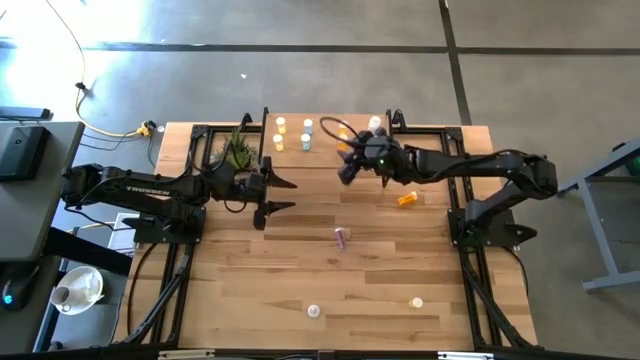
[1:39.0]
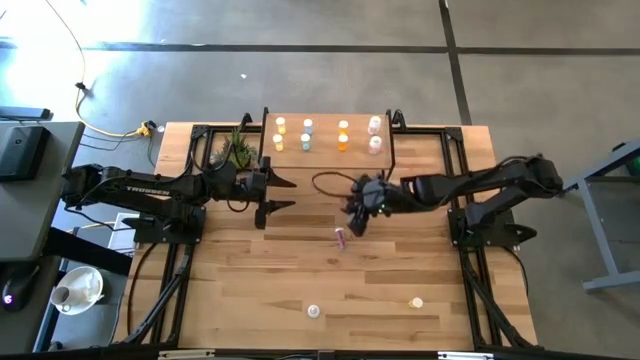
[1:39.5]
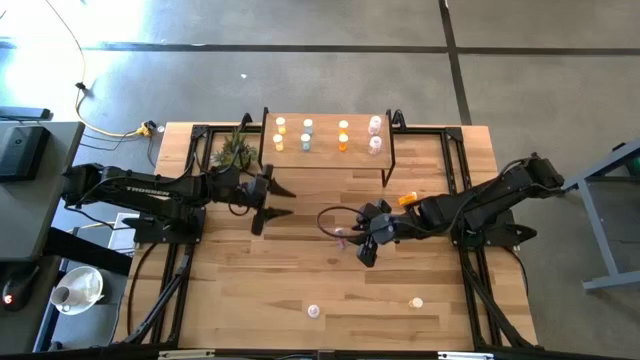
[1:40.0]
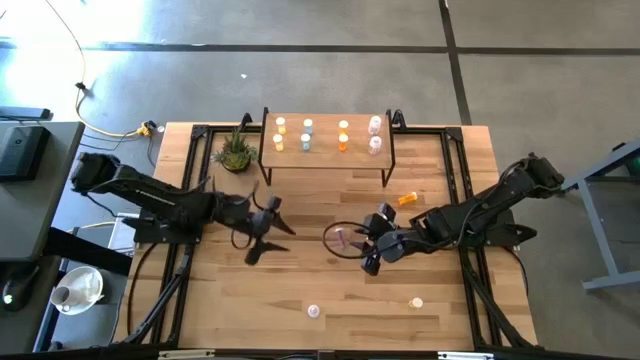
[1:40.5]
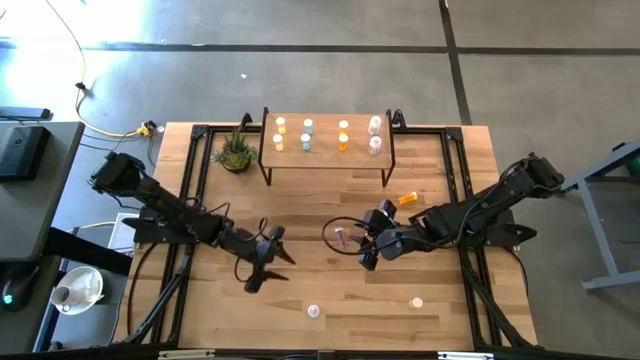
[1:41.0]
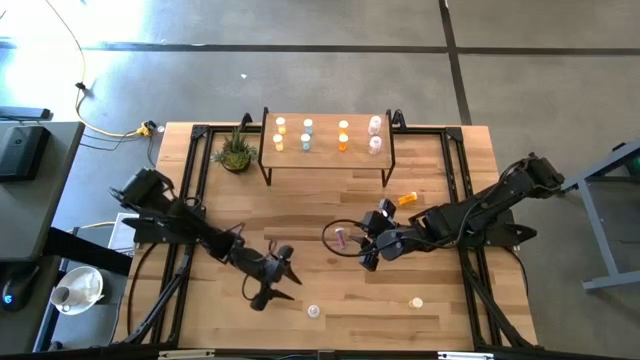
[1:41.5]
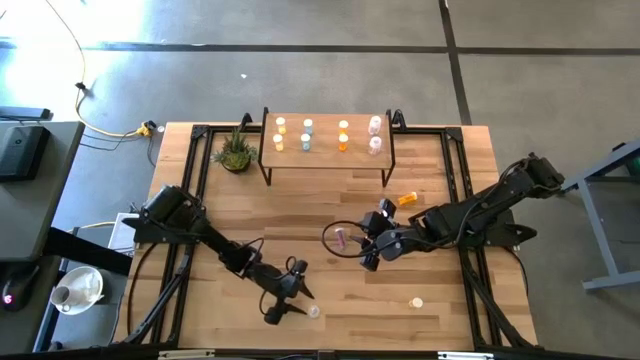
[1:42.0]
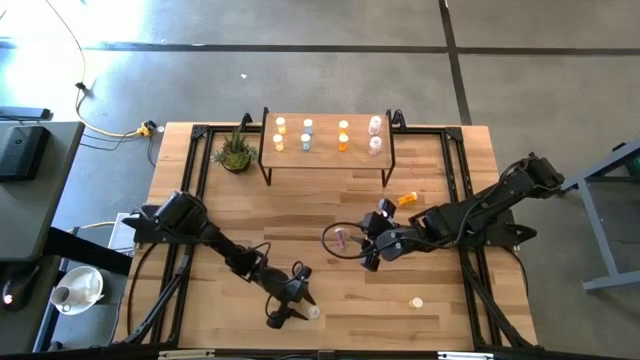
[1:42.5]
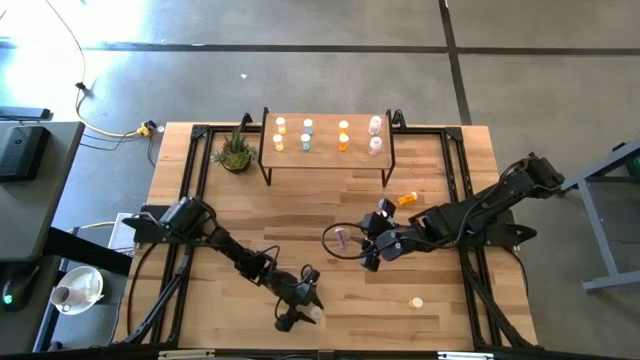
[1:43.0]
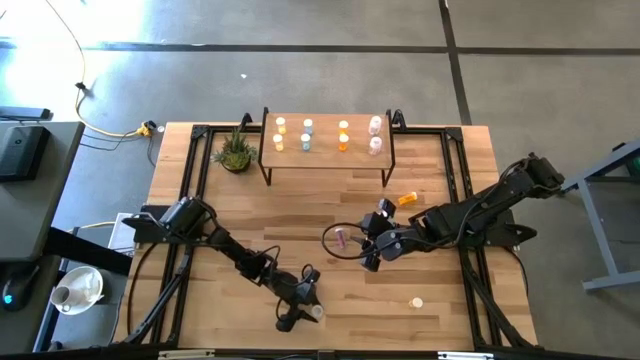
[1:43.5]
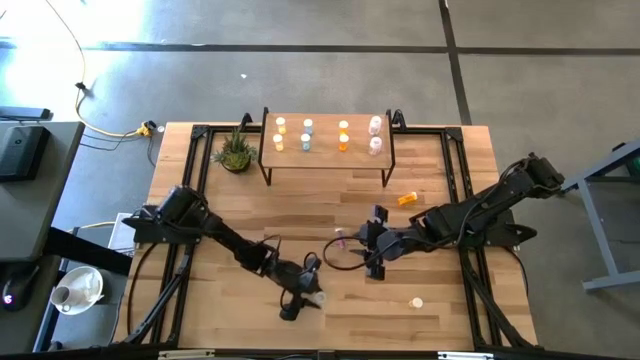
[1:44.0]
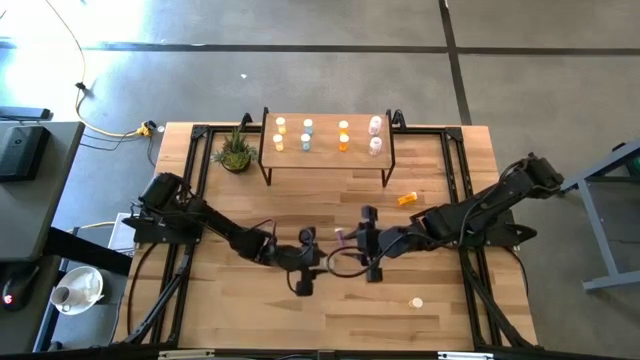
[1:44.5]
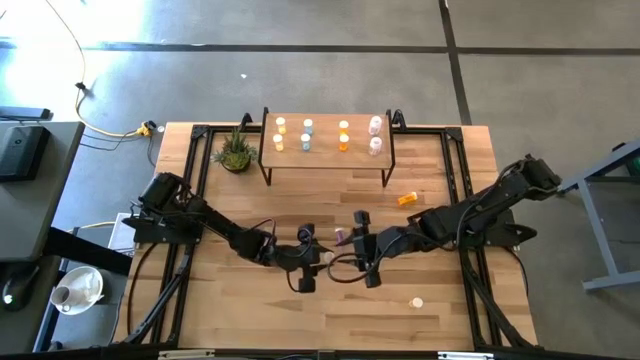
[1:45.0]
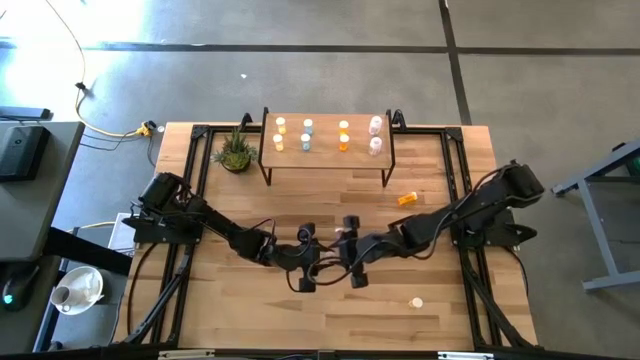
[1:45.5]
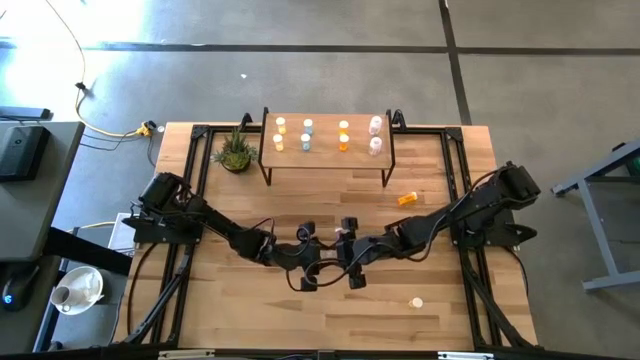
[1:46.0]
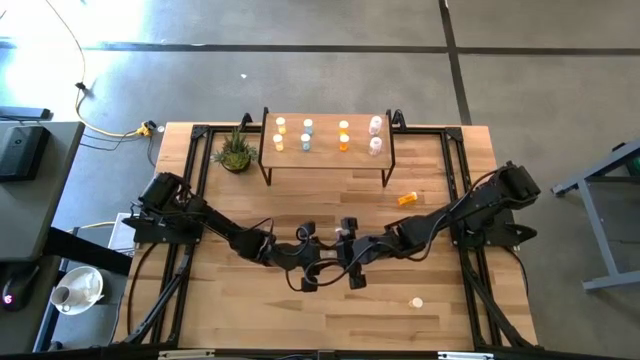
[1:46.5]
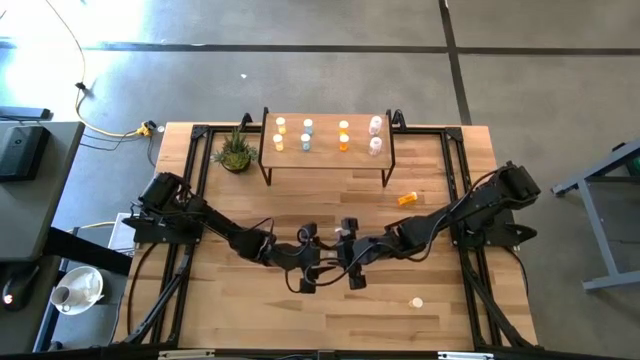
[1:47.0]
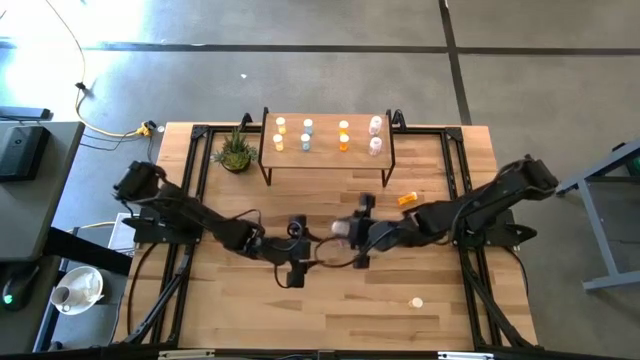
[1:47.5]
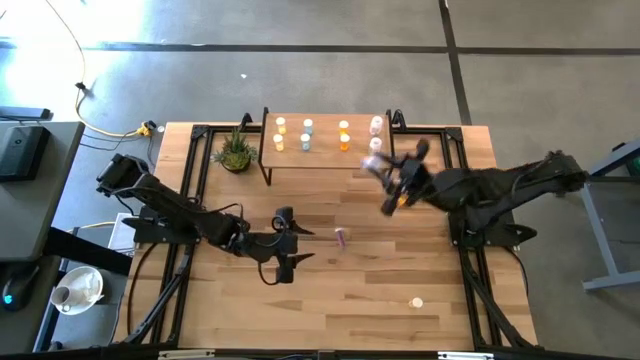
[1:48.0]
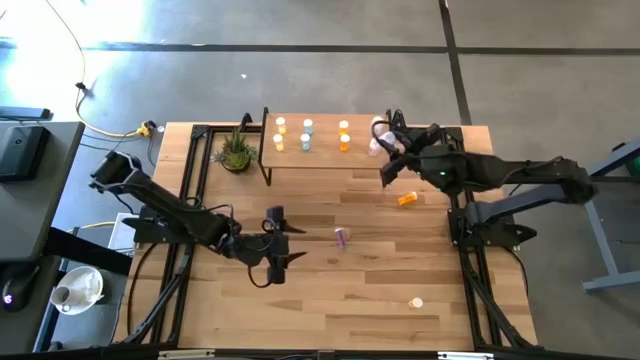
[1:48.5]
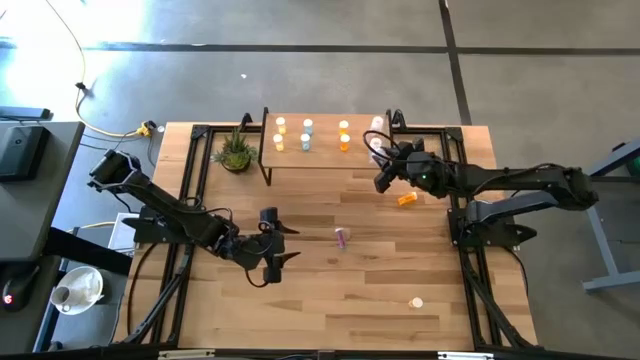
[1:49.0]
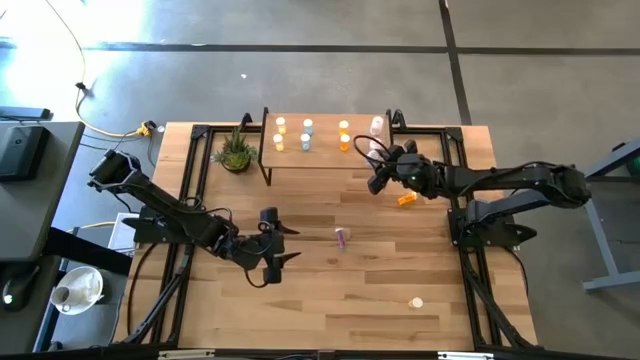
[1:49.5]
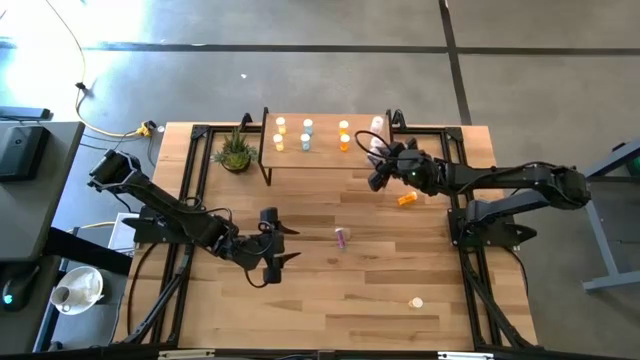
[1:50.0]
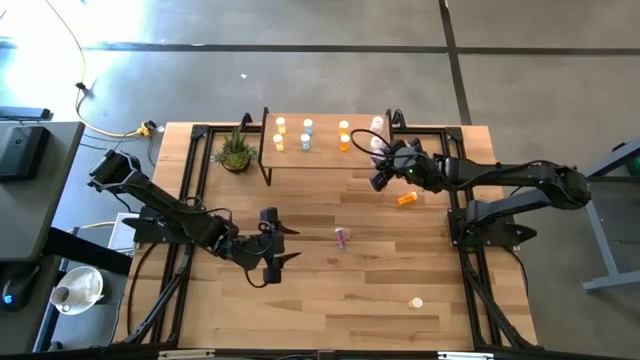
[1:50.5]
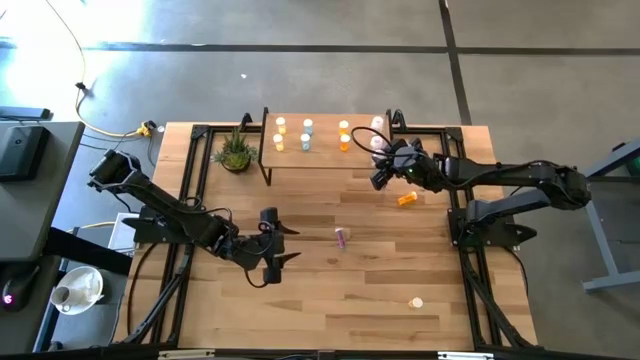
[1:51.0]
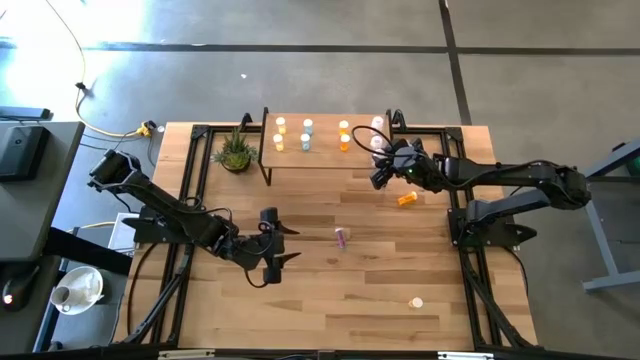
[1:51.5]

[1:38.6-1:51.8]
Task: Pick and place medicine bottles onto shelf by color
Put the white pill bottle on the shelf aligned with the other white pill bottle
